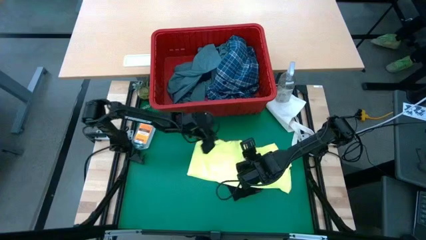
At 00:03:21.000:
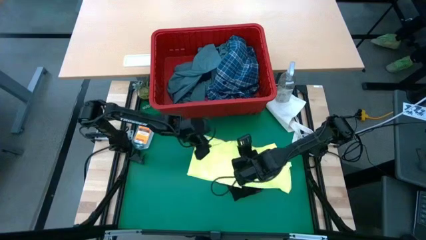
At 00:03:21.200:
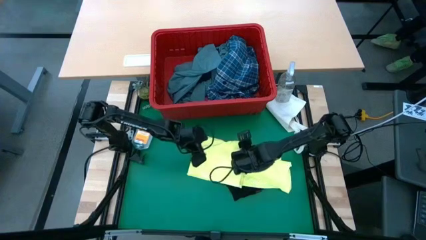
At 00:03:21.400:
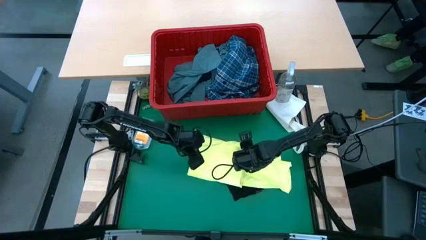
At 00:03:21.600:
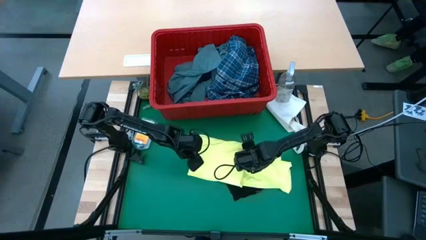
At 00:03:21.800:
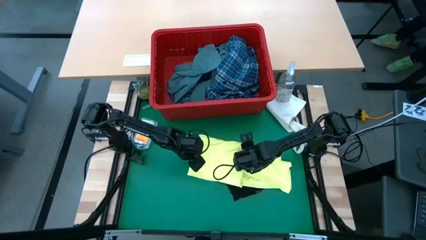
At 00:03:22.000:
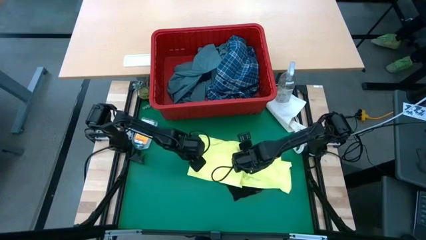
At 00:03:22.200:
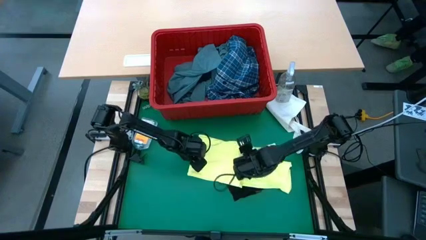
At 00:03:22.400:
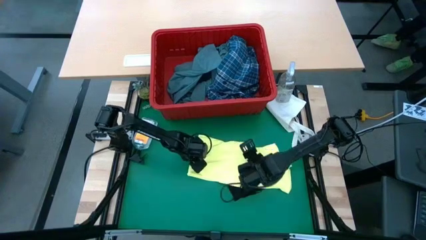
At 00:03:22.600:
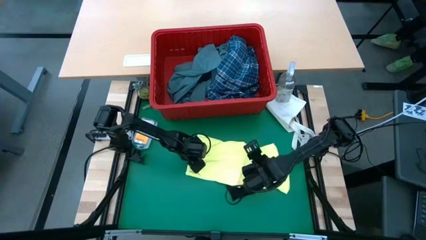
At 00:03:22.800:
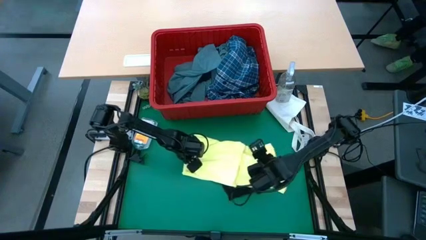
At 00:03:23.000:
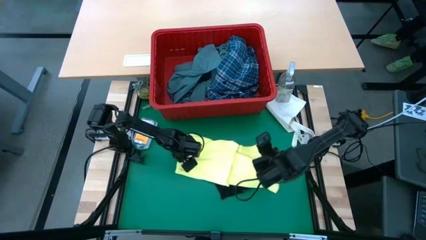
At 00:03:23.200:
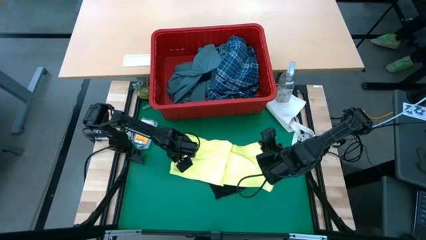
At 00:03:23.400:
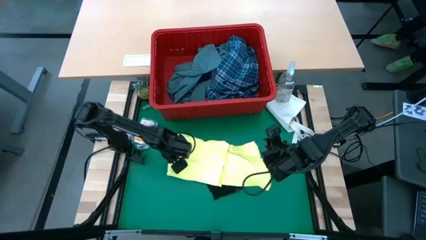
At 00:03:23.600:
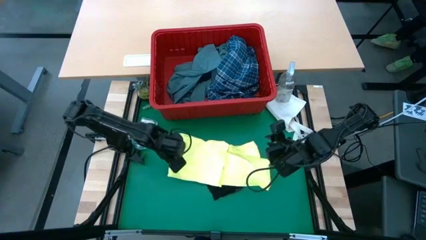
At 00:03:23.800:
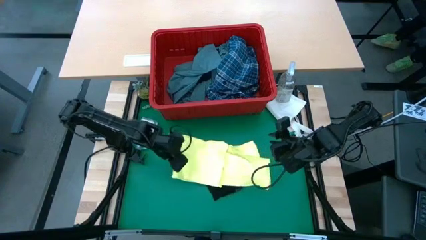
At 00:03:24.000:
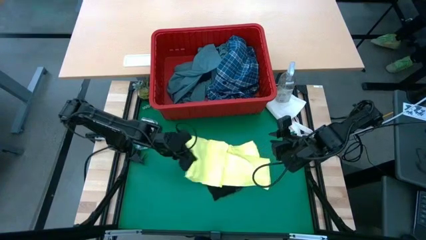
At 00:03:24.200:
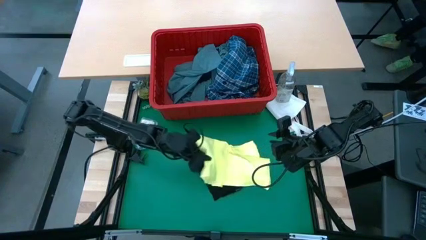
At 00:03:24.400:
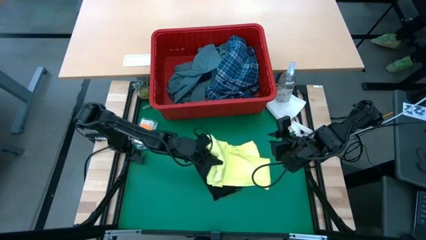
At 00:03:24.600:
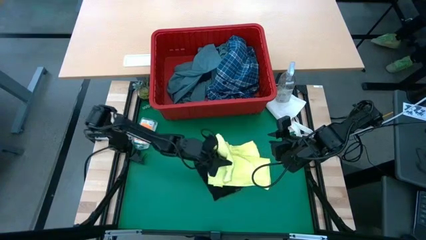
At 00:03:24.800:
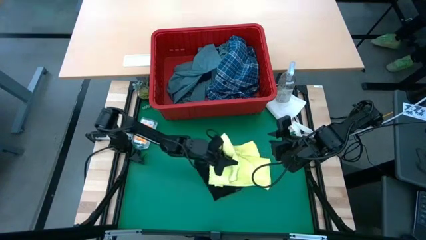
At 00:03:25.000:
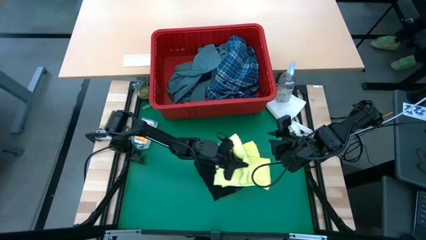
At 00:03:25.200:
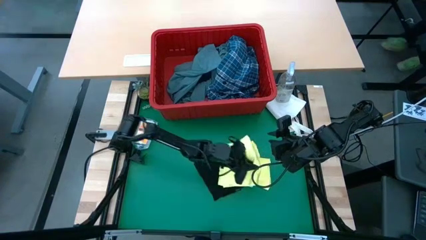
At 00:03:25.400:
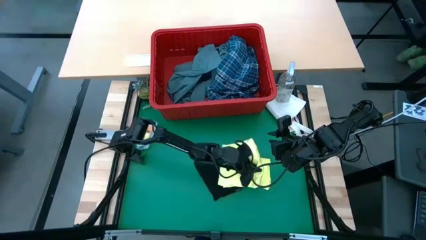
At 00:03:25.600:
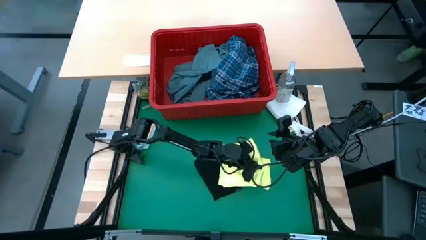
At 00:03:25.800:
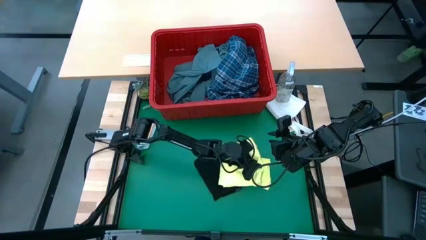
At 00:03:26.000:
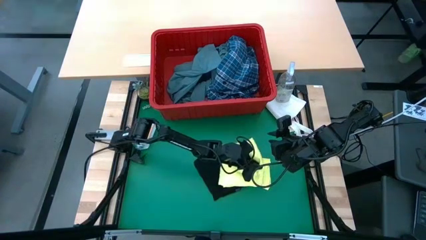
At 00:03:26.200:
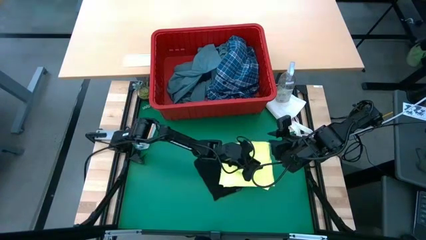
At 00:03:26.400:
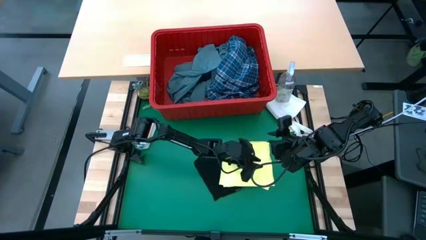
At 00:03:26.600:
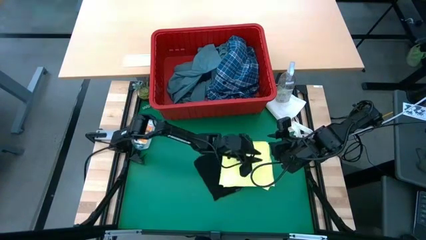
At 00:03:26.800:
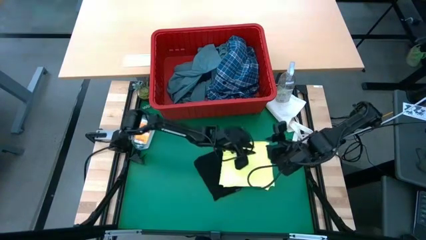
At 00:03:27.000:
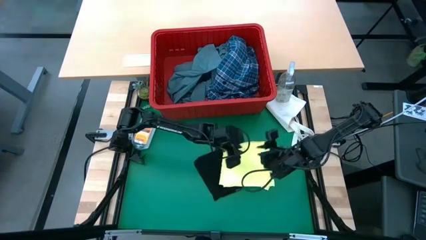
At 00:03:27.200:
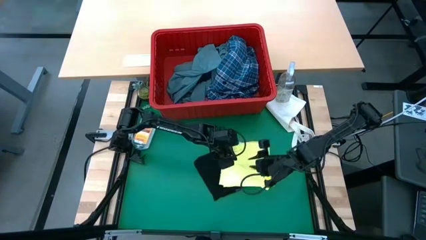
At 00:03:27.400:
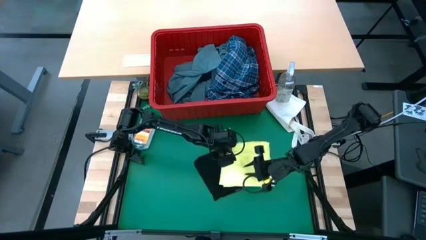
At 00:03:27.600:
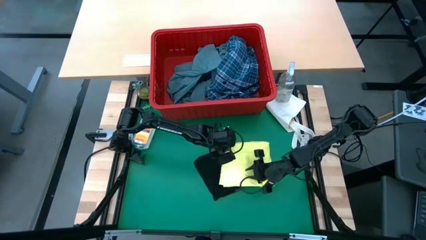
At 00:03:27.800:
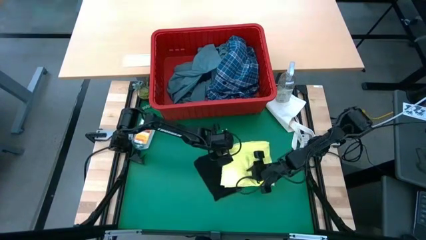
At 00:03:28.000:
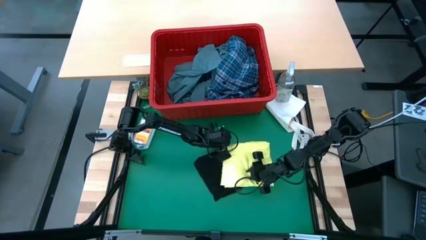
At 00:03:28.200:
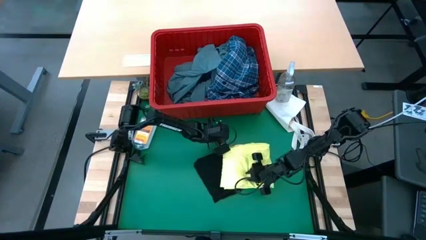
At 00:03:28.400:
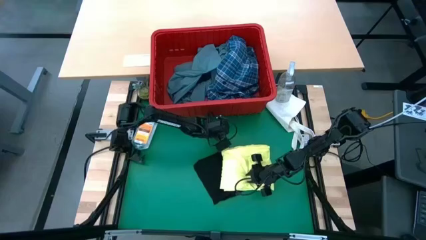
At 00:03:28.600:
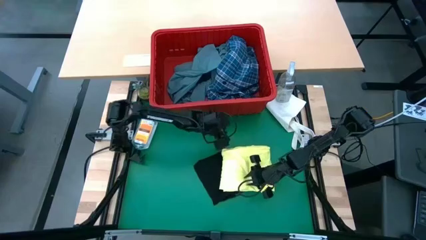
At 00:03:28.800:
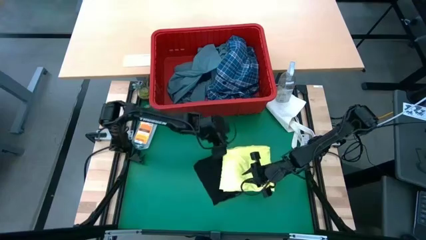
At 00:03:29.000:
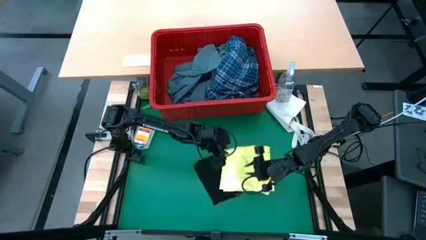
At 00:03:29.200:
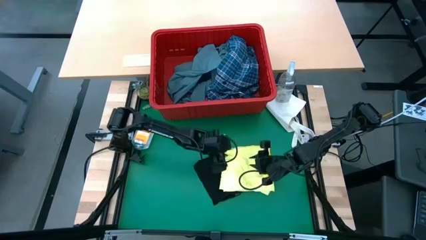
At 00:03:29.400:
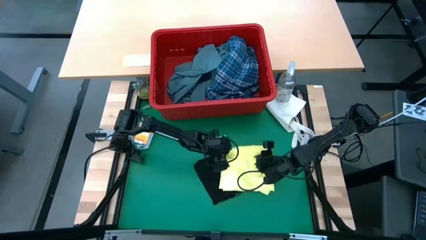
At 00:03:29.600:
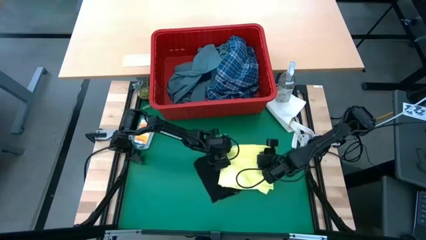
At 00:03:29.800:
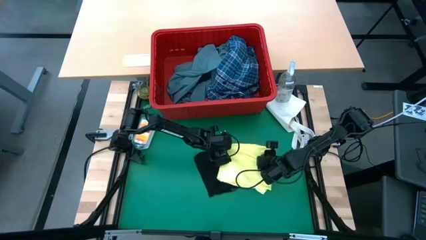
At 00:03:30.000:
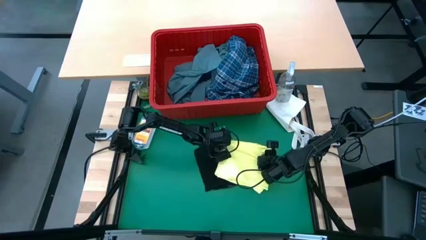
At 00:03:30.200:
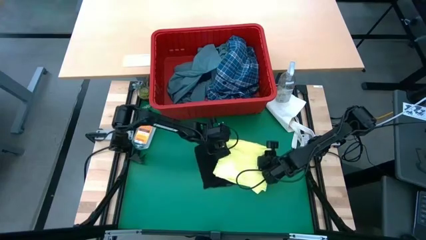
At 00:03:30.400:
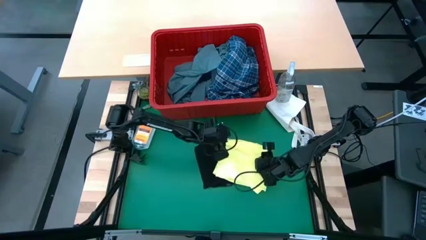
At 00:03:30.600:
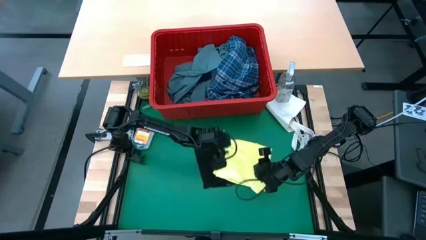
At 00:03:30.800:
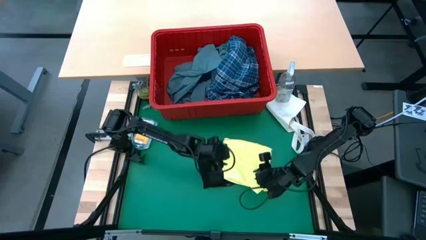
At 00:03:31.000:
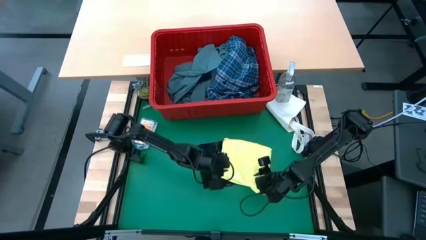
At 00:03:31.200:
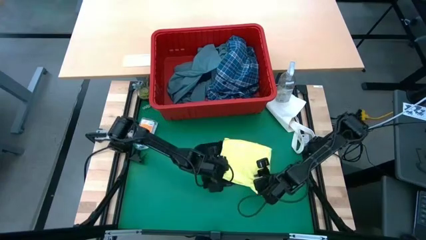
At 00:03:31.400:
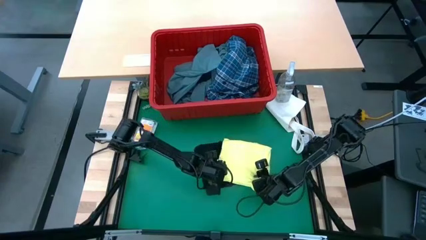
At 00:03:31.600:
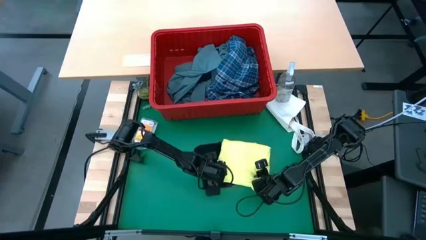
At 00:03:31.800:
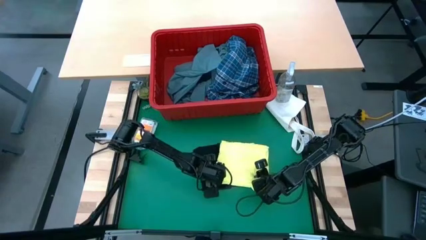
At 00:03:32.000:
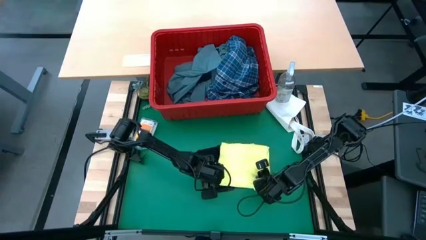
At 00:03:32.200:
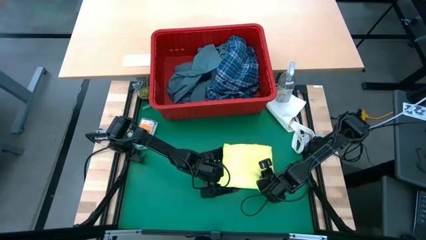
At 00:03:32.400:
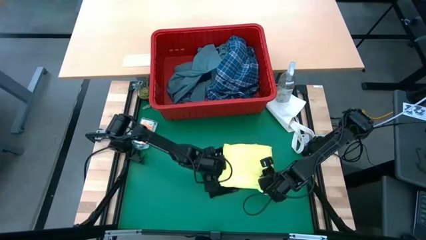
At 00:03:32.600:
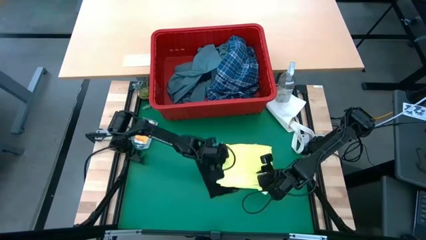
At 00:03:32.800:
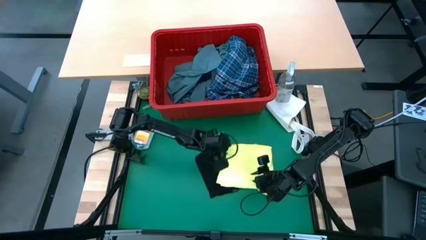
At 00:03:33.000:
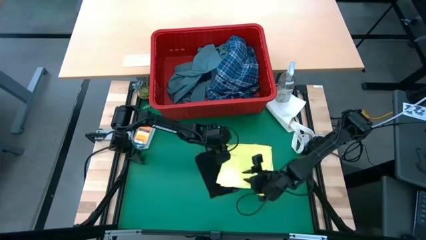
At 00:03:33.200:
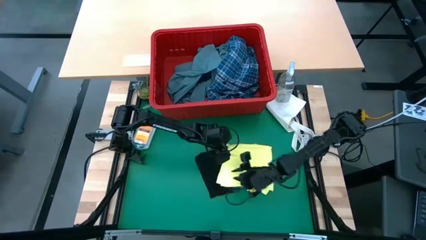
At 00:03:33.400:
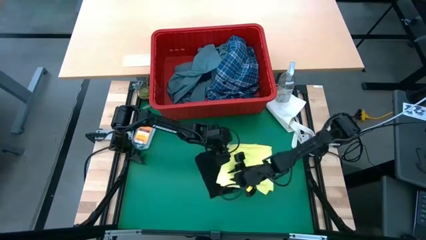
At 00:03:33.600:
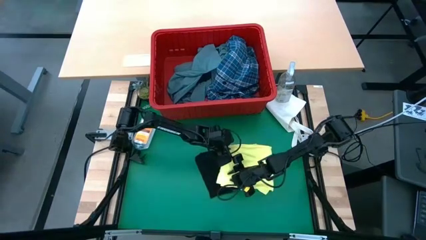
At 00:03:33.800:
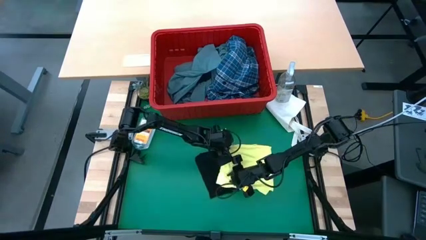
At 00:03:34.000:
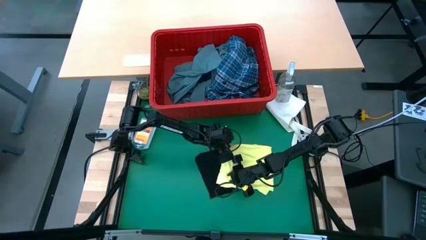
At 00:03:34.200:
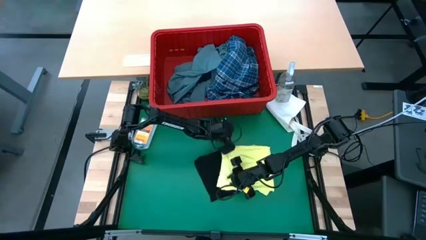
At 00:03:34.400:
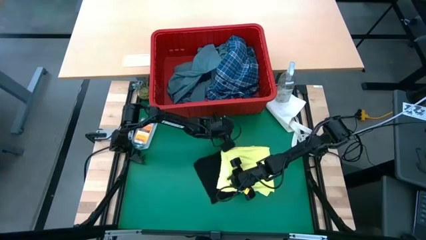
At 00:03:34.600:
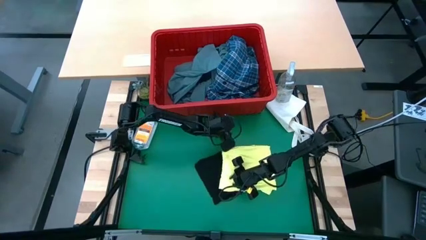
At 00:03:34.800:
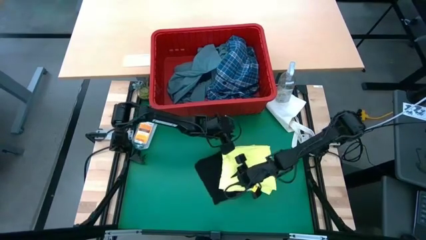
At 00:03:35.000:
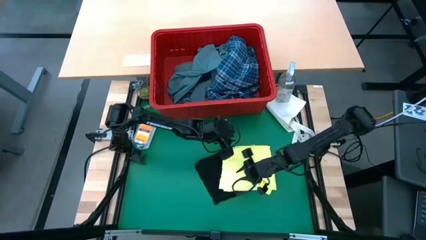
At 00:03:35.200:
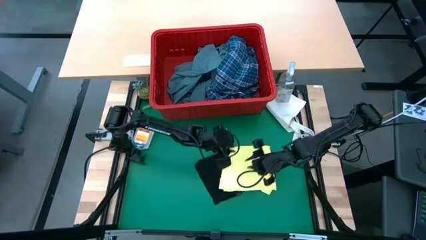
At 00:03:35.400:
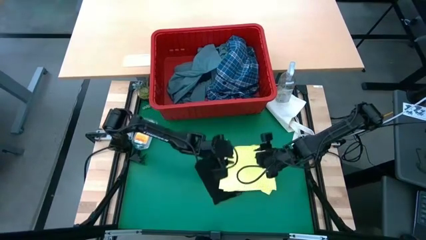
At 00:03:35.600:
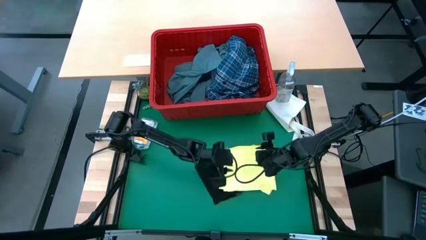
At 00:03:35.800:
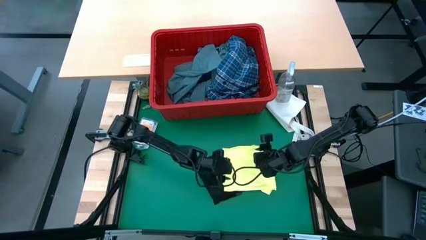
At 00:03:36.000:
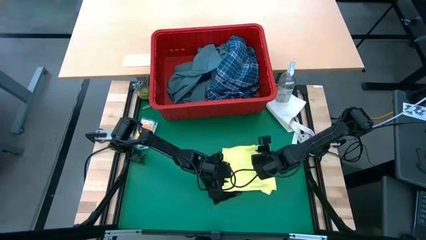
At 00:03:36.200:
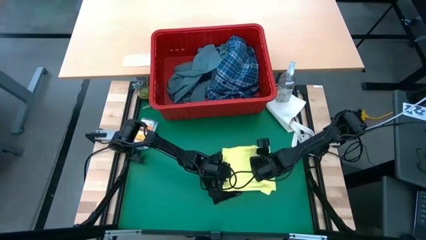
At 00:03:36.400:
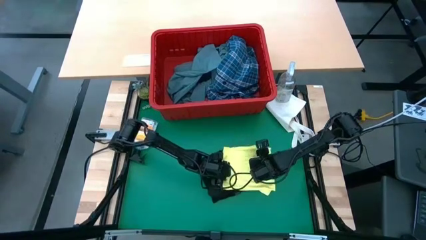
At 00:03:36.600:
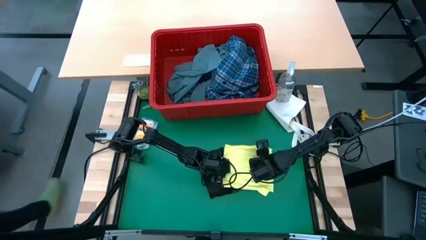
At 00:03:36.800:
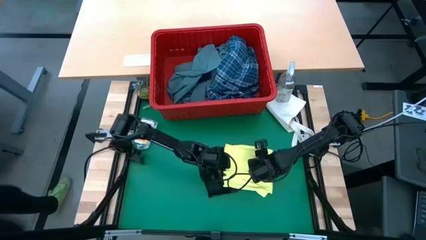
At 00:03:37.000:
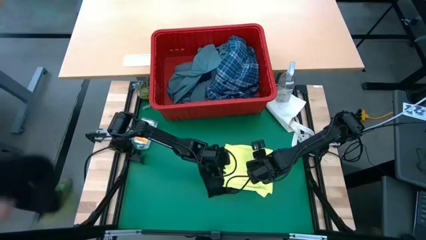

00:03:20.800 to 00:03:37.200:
Task: Fold Laundry from Bin
Fold the yellow shirt
